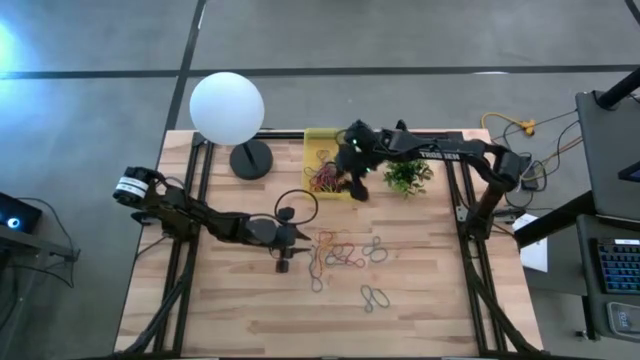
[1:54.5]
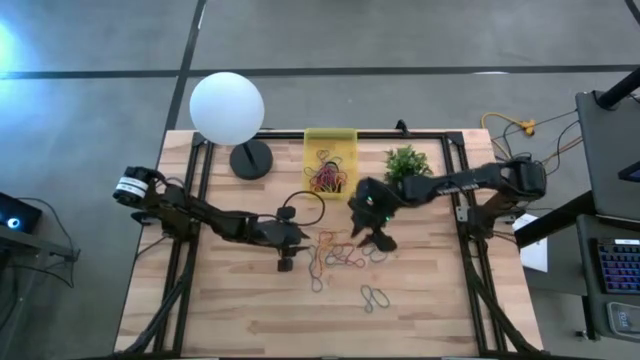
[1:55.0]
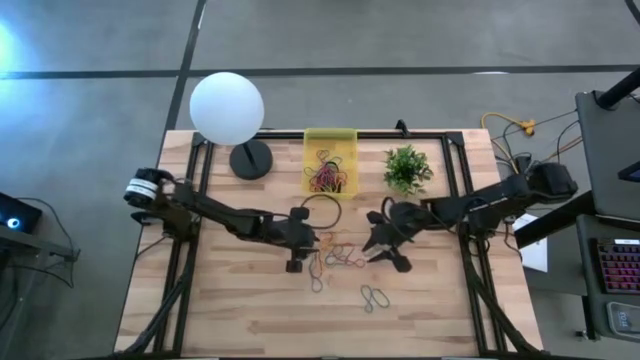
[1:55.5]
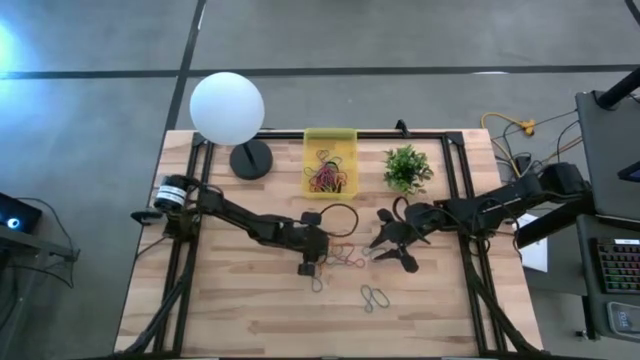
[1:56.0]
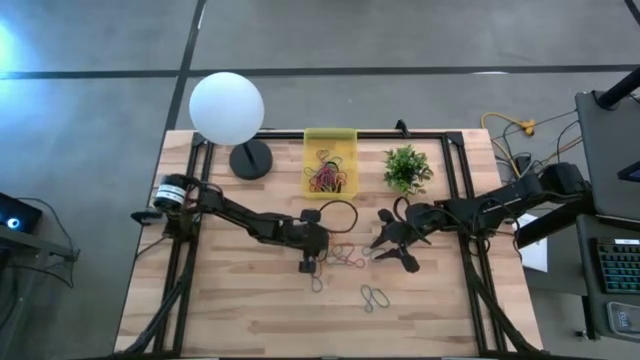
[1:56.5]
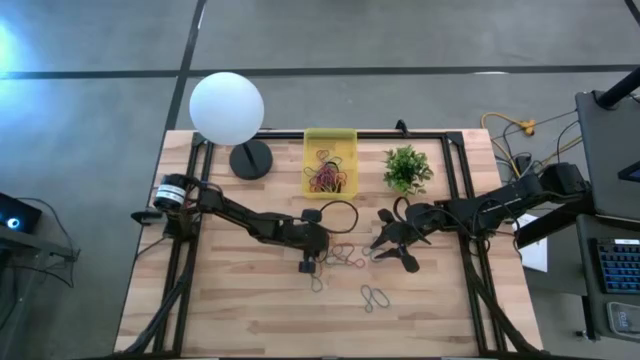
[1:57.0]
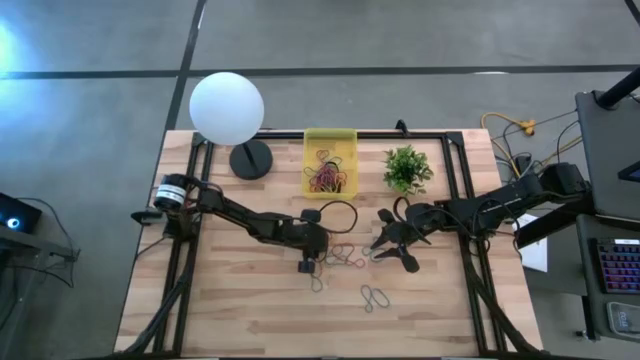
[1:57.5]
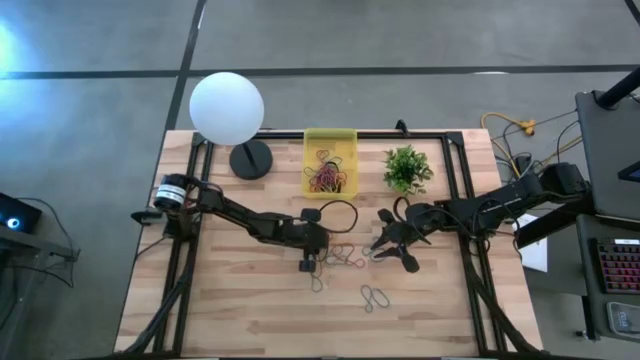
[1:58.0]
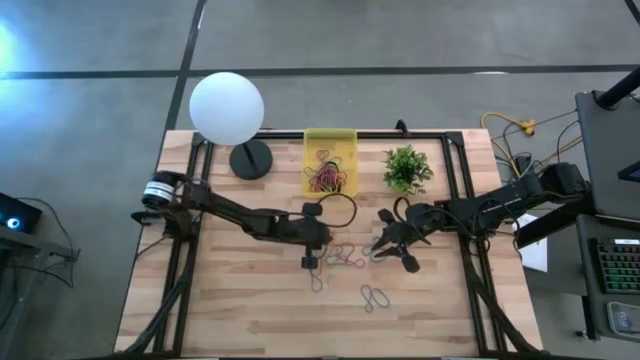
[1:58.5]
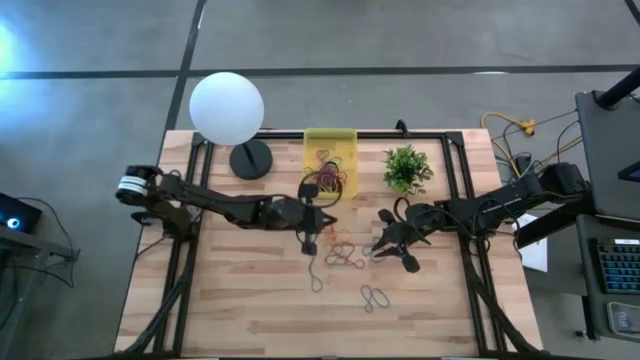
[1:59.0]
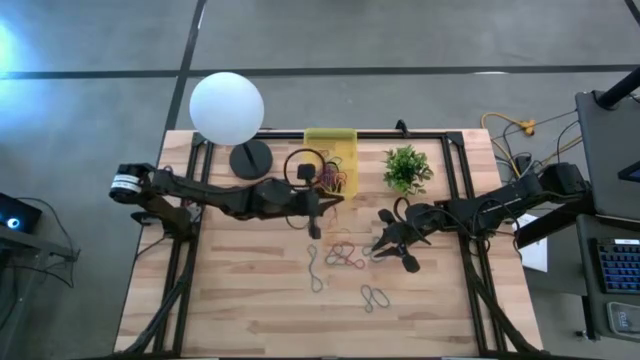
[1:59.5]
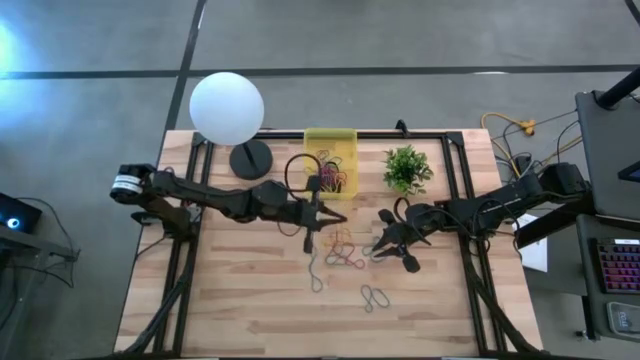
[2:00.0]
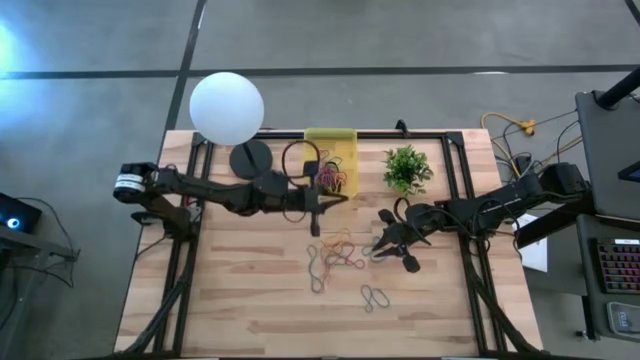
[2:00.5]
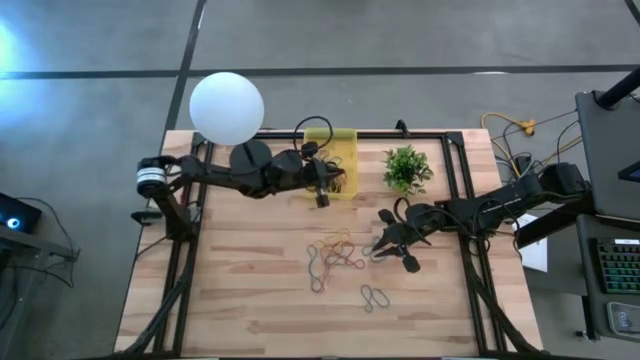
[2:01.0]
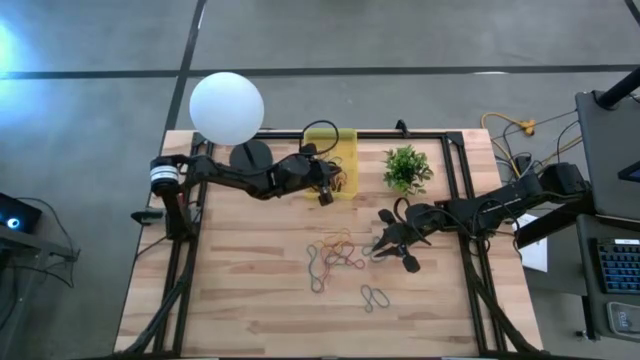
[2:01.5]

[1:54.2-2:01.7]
Task: Pick and place rubber bands into bin
Put the yellow rubber band into the yellow bin
